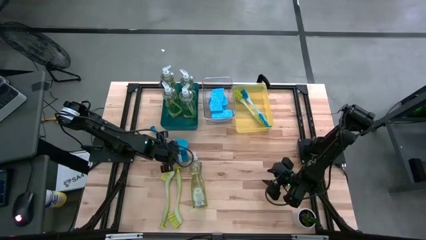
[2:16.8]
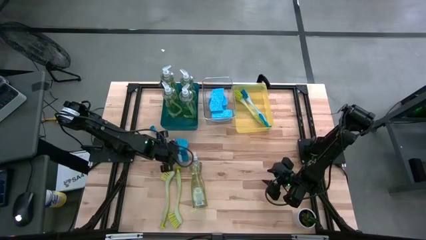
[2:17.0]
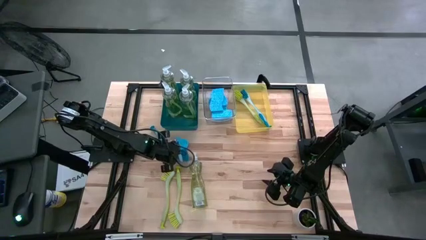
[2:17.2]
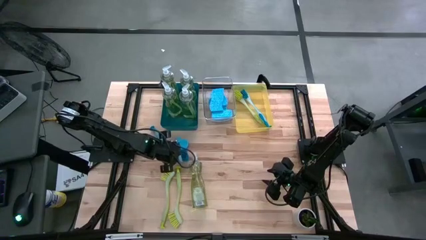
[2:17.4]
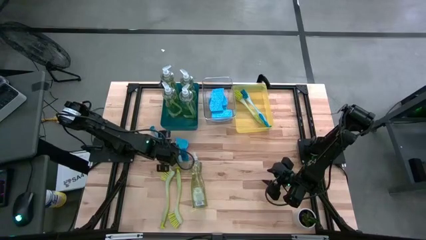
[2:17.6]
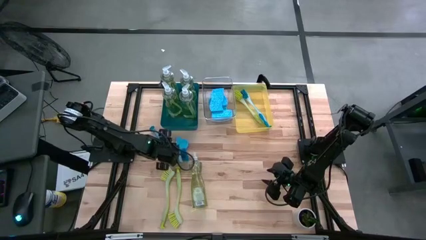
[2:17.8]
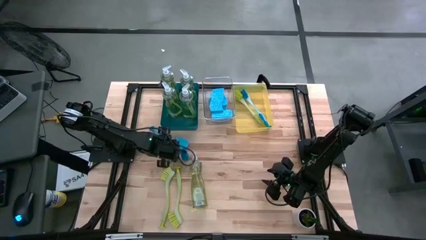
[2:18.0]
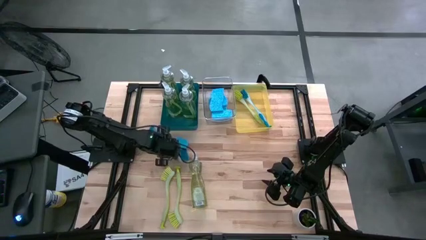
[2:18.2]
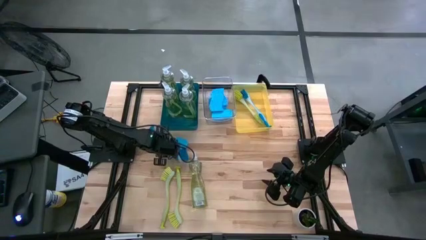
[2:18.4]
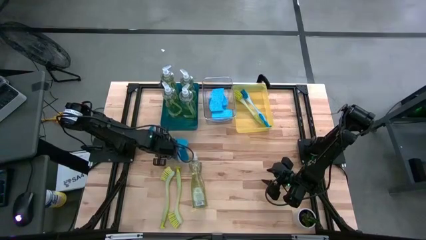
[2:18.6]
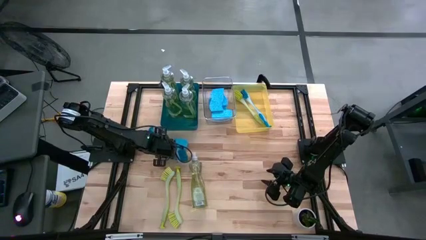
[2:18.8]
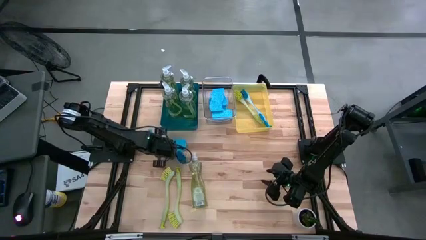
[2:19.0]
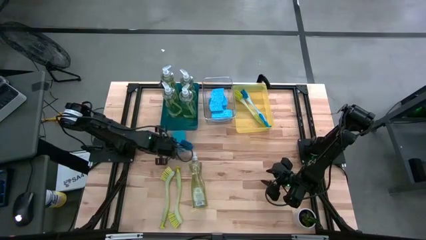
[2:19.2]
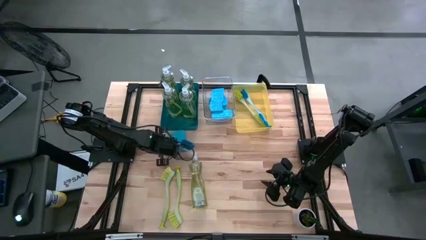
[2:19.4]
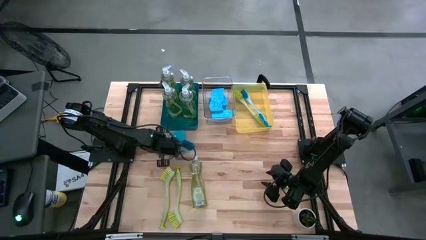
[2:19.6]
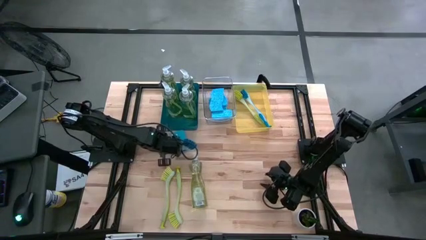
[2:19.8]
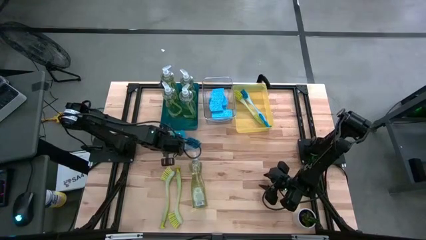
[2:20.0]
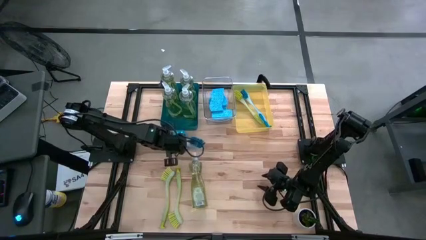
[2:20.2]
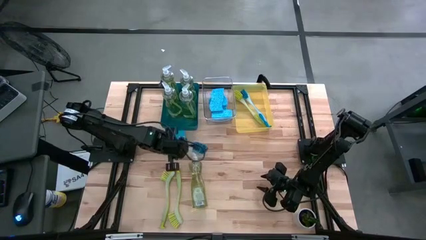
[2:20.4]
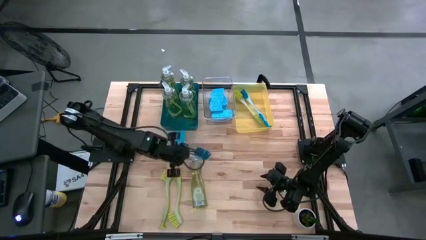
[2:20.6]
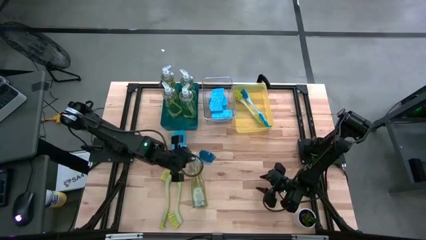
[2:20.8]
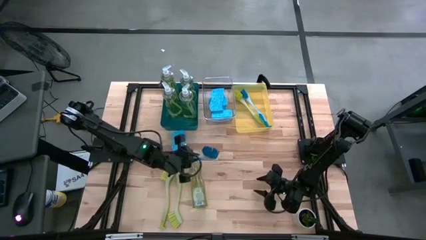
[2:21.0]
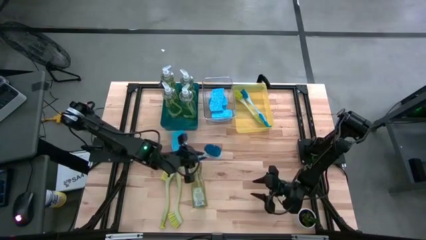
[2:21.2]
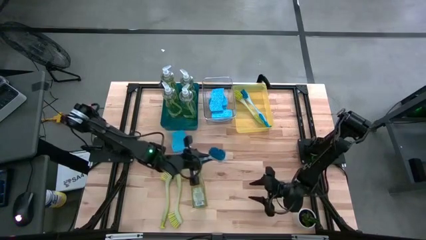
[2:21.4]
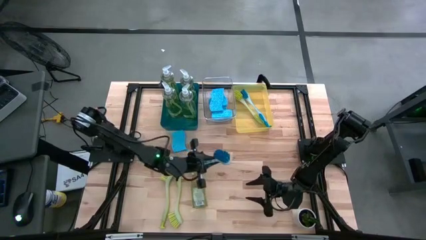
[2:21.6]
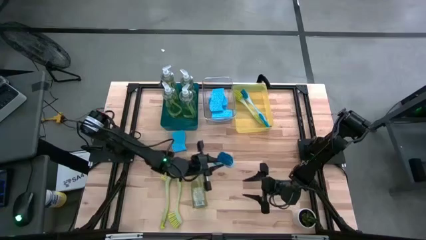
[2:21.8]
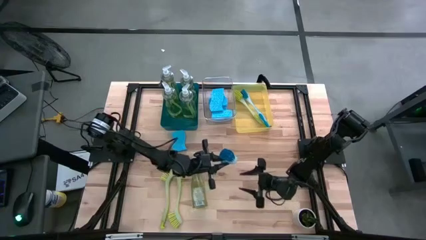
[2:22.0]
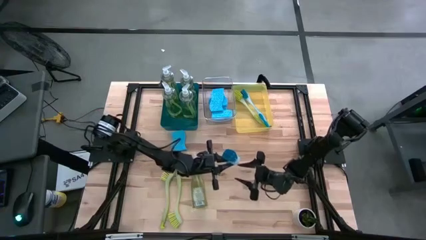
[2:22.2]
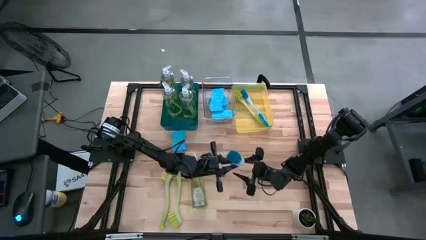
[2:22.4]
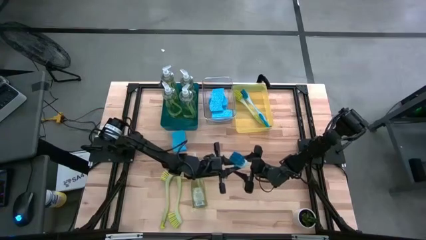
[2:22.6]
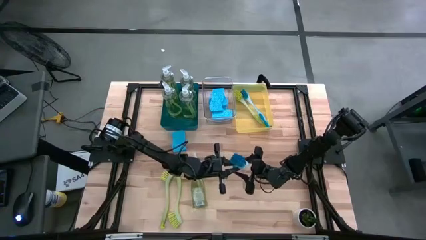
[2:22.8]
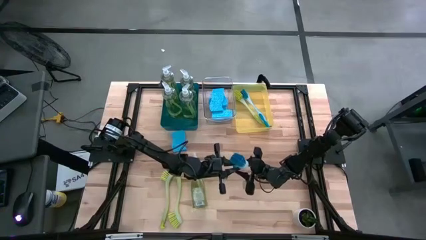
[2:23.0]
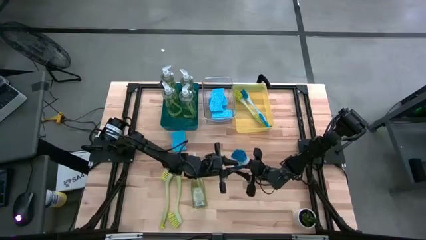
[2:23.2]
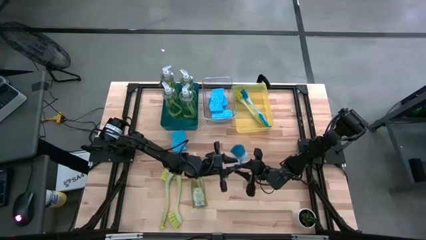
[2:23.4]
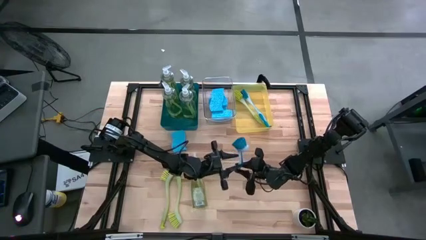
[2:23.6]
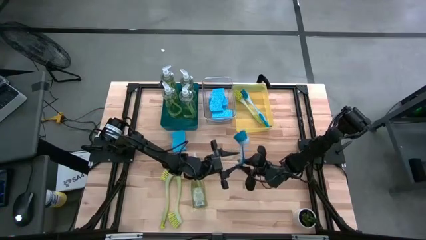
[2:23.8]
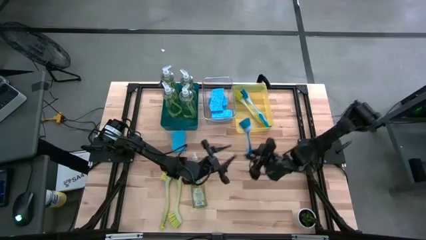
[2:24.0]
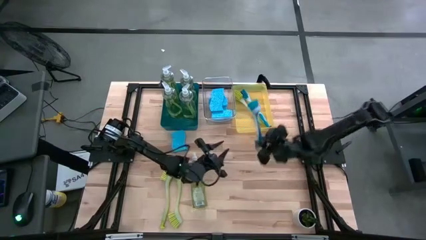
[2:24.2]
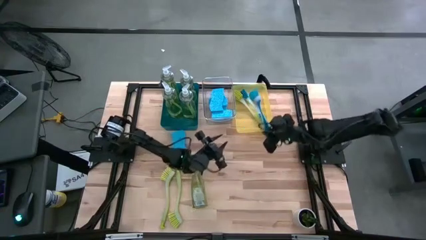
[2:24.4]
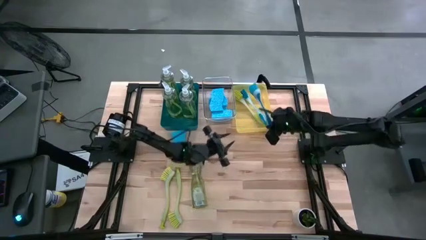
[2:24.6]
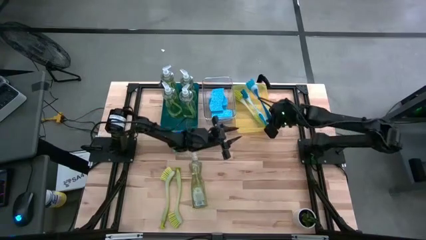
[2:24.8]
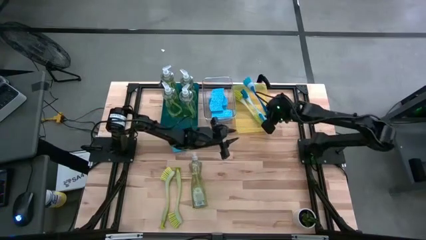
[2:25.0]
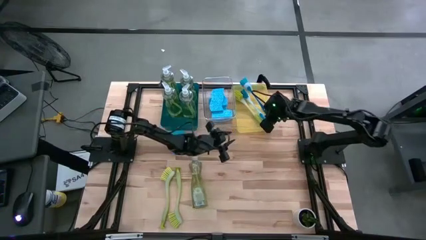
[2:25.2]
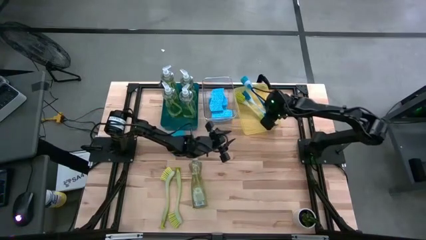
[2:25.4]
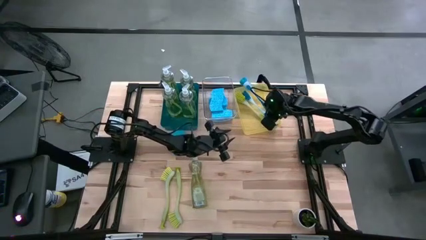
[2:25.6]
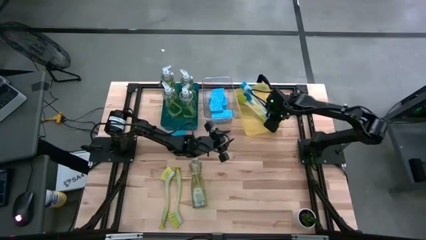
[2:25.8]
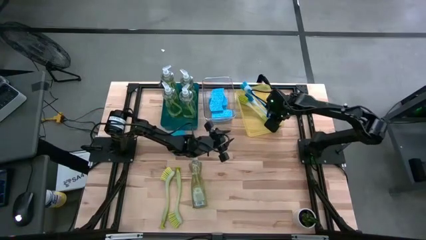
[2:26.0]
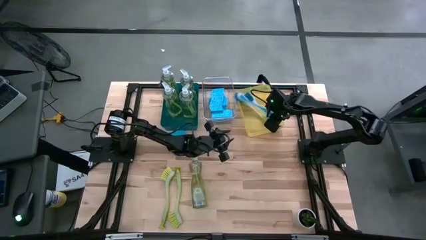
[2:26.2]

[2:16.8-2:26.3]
Task: Pick & Place Kitchen Sink Supplies
Put the blue dish brush into the yellow bin

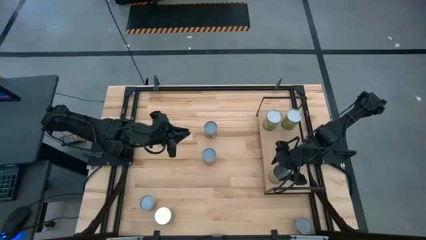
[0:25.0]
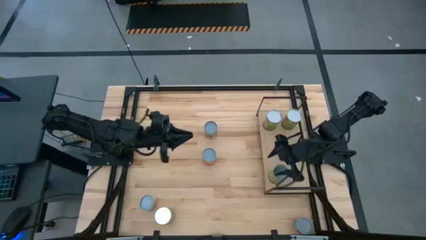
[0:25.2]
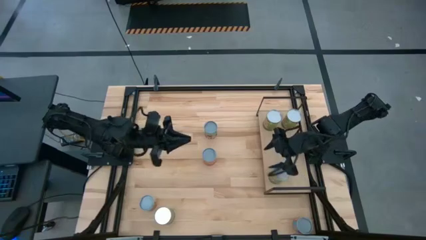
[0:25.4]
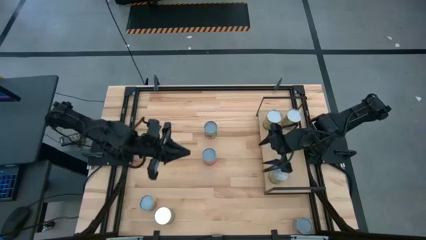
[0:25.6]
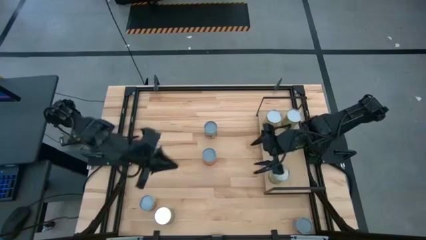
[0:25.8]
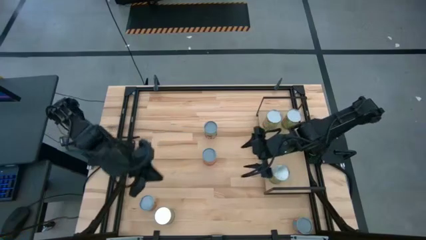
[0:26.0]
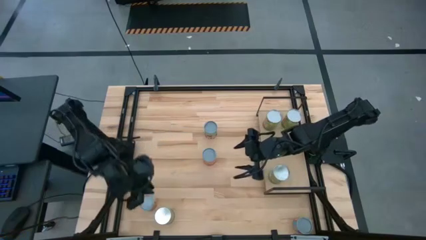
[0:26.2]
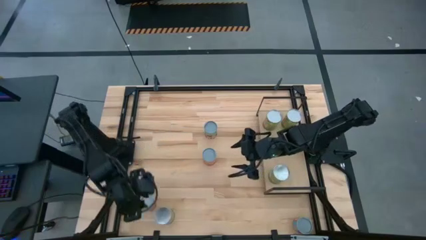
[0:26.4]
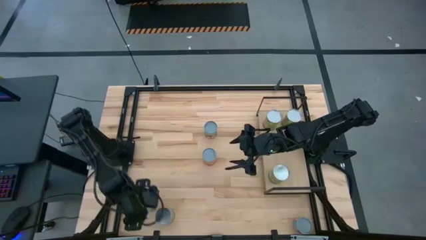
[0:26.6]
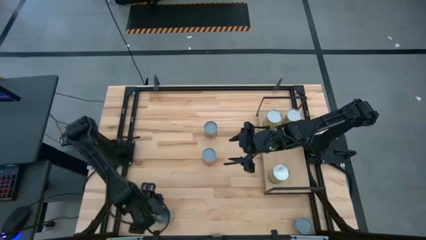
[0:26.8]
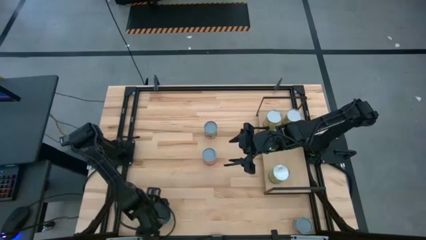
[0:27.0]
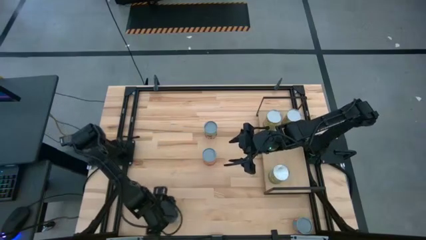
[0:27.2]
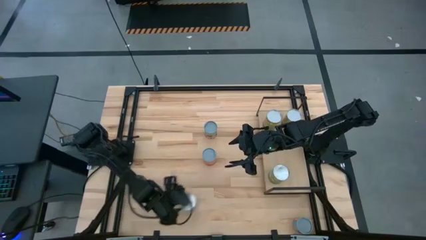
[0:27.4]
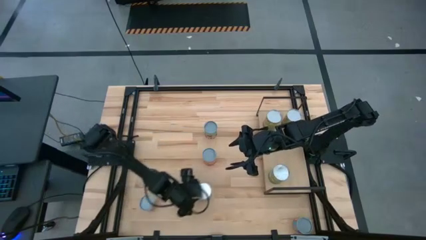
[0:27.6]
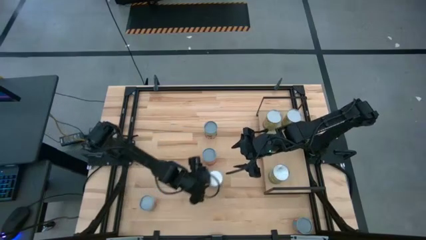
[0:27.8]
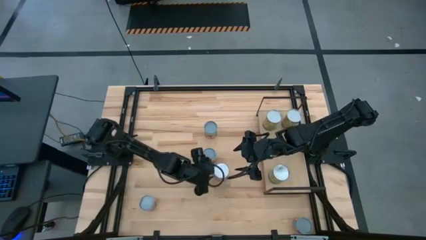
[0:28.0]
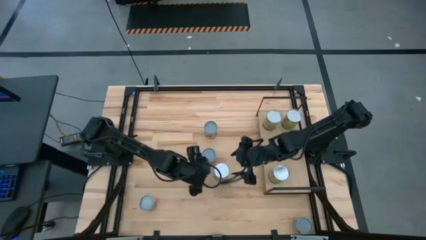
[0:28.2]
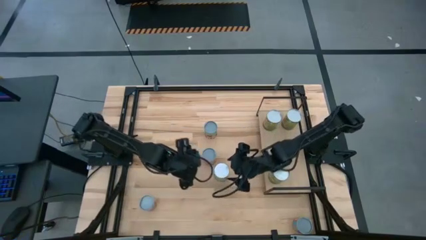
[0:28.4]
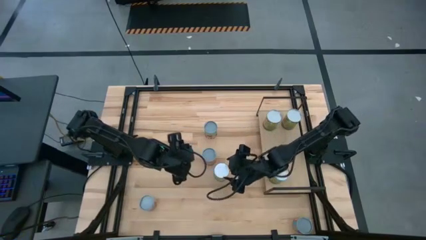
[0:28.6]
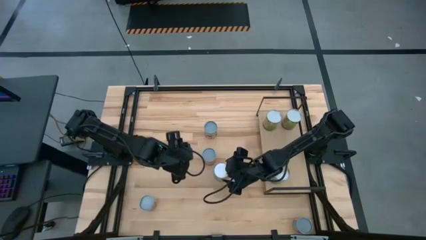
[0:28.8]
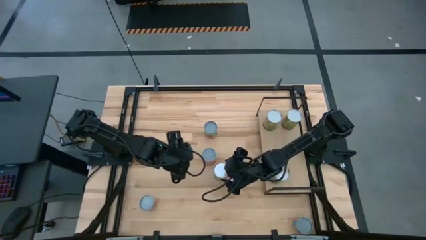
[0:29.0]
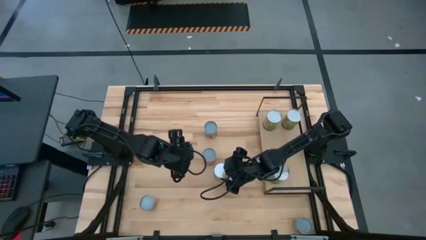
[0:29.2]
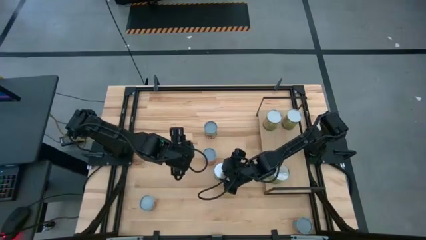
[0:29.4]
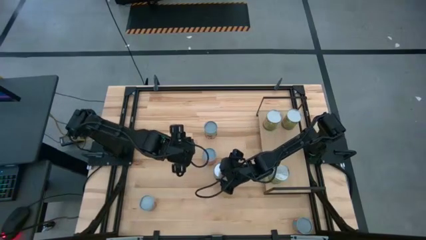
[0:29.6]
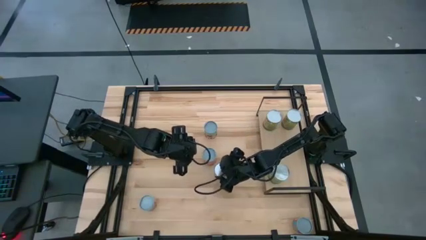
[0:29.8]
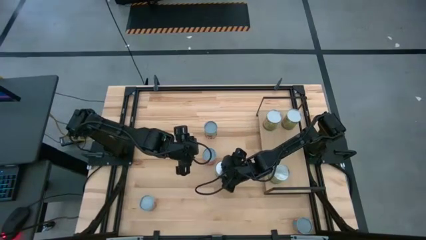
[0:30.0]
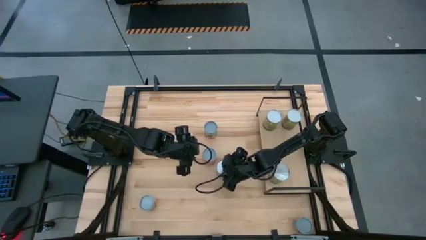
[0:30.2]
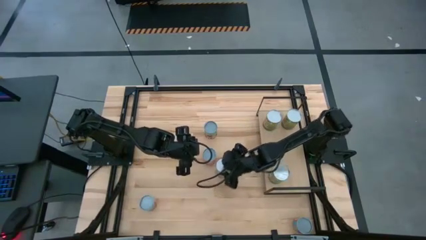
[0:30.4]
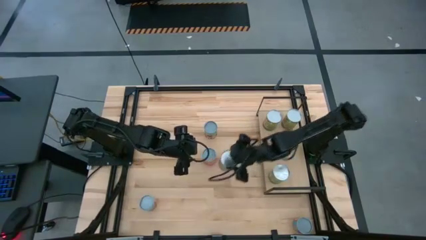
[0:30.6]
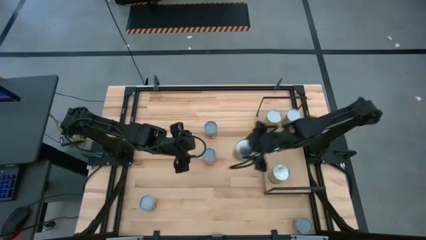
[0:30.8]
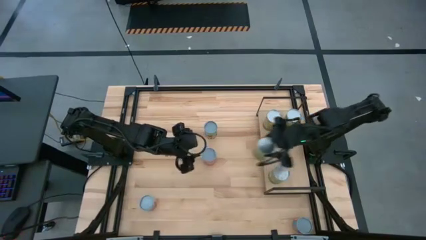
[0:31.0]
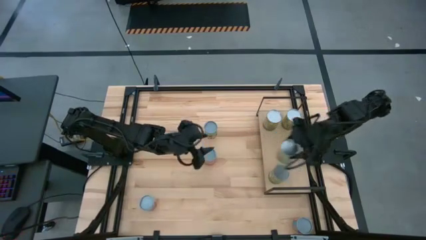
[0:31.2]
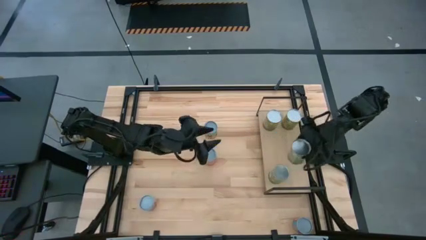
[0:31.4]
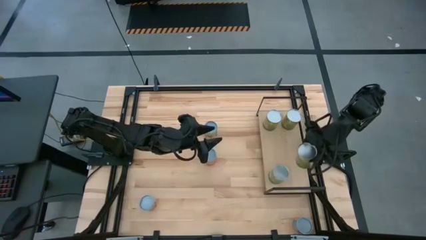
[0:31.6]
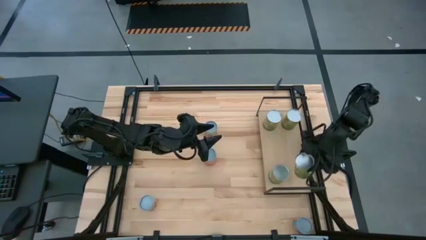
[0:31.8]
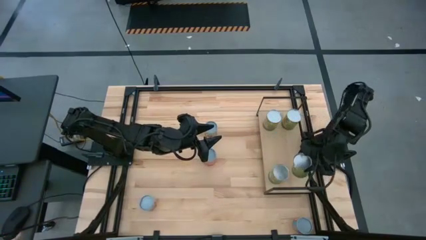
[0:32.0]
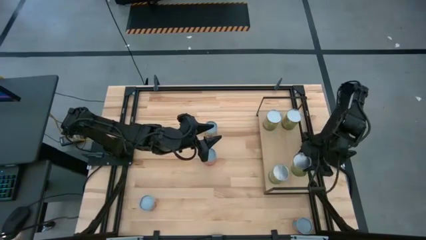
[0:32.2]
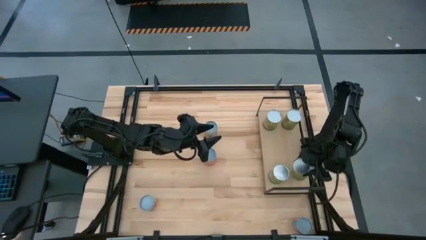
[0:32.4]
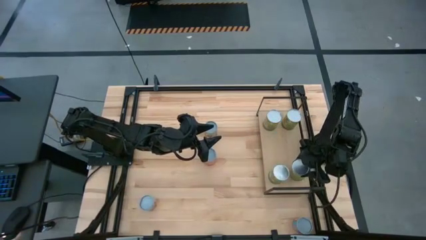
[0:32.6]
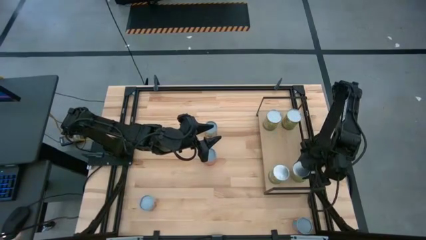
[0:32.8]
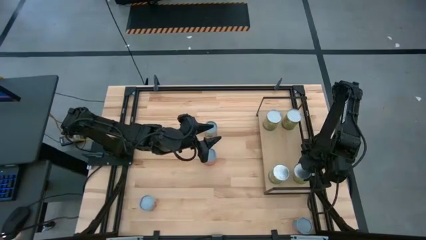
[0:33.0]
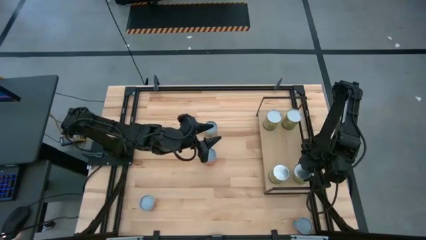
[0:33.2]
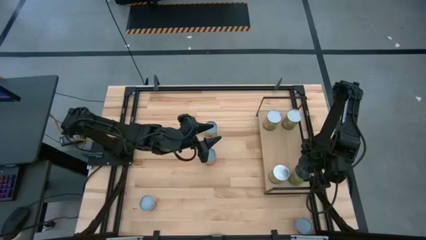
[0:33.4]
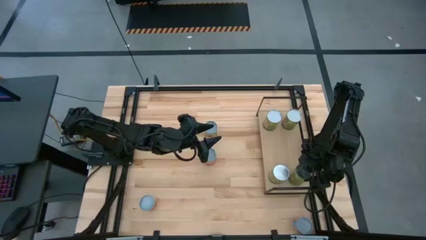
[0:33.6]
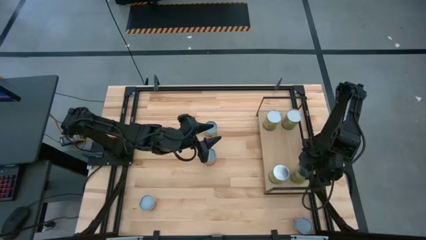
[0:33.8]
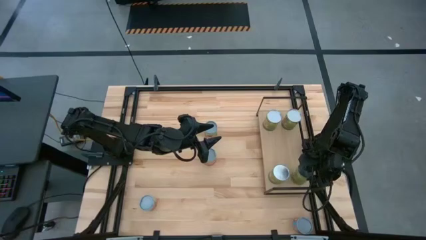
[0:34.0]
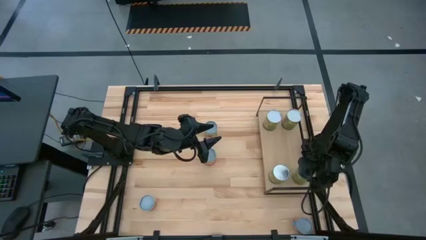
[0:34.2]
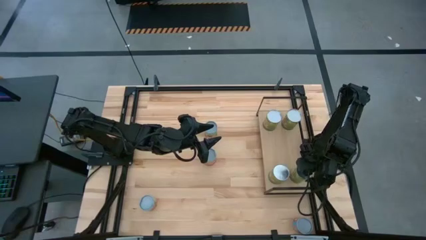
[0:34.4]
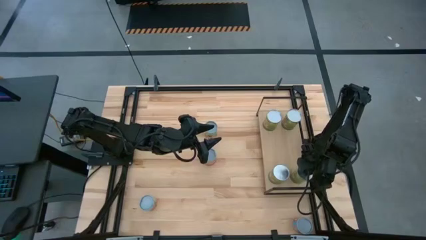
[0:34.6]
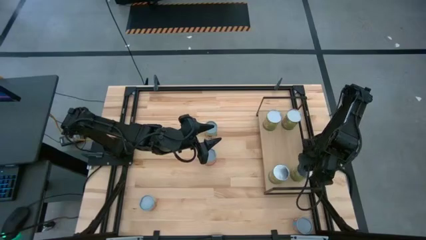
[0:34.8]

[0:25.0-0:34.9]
Task: Pick and place cans onto a shelf
Put the canned peas on the shelf aligned with the other canned peas
